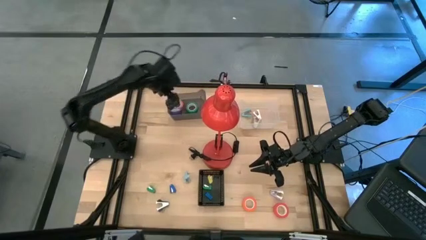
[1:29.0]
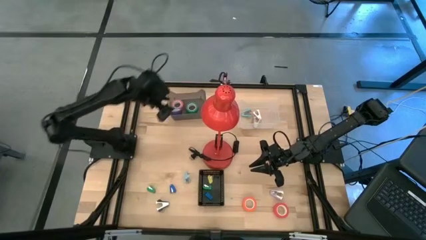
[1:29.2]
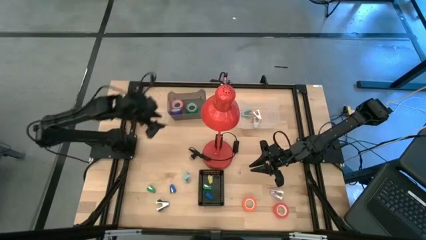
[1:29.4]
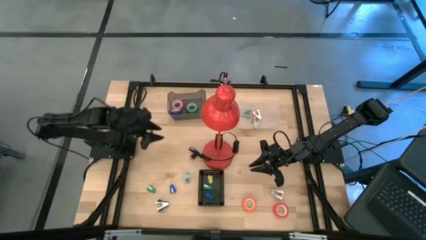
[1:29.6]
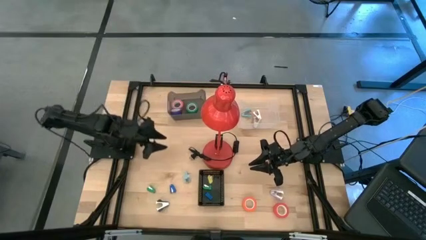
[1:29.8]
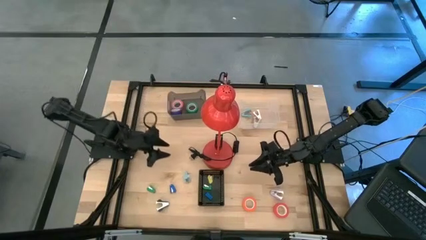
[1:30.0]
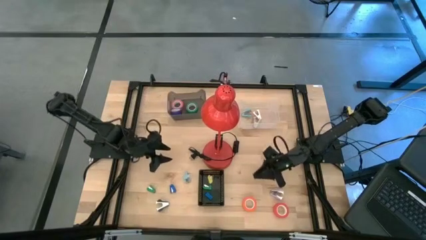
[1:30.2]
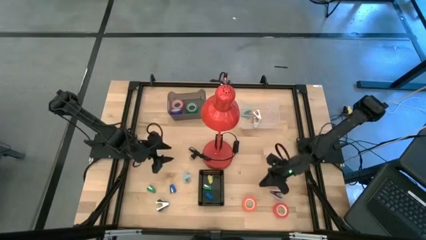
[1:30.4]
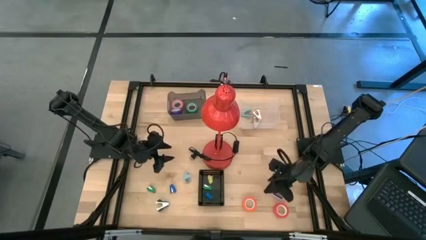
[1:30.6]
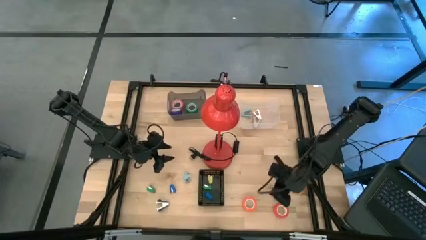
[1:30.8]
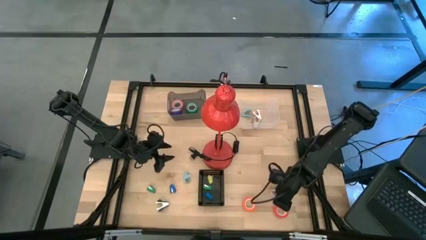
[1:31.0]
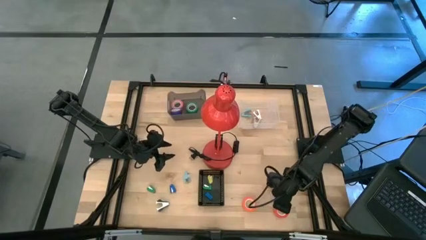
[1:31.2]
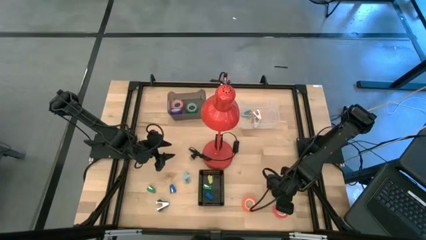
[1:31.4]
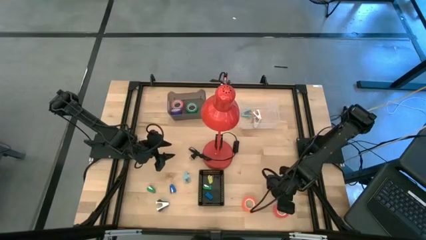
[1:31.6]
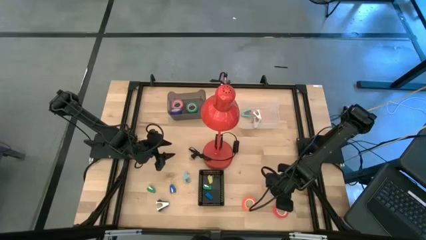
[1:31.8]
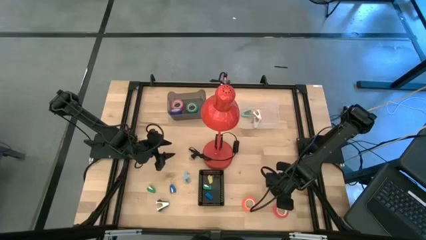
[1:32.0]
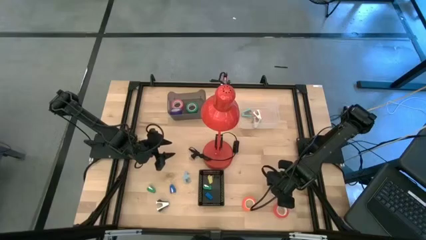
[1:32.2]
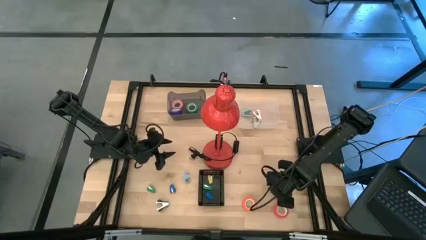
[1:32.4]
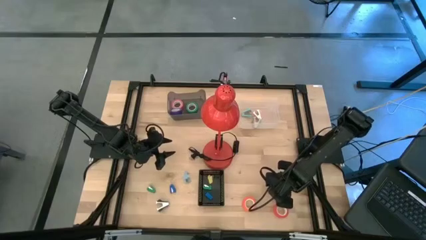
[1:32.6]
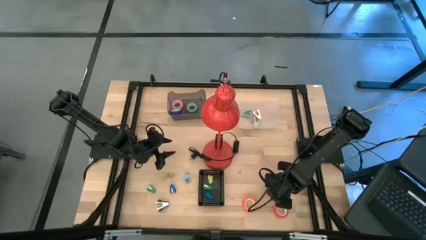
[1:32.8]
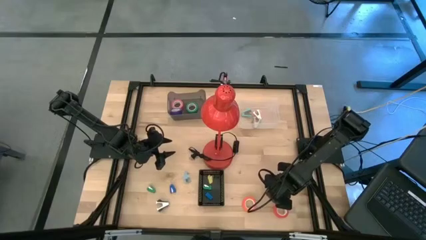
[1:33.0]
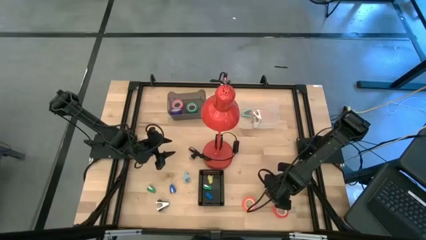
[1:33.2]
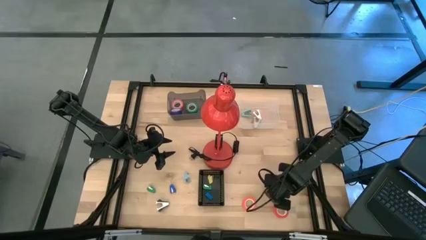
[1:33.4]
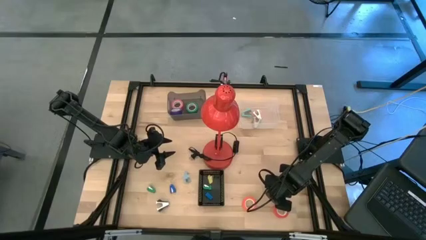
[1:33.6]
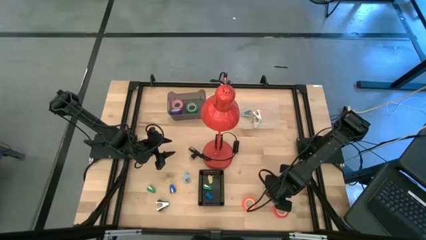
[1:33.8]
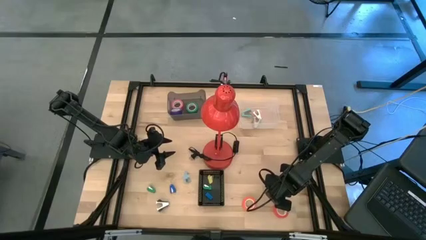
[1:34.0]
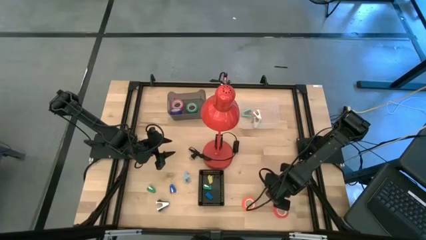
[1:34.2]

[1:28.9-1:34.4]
Task: Pick and place Stapler, Stapler remover, tape
Put the purple staple remover into the transparent bin

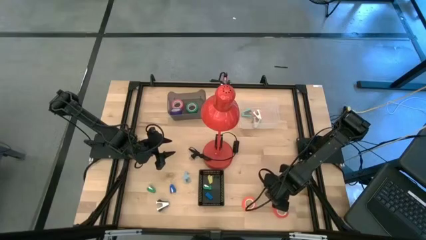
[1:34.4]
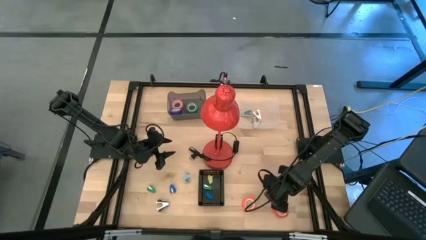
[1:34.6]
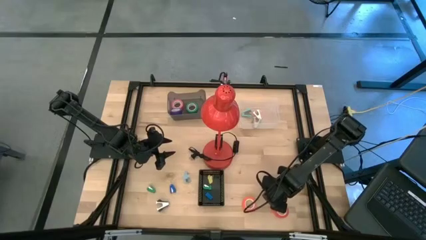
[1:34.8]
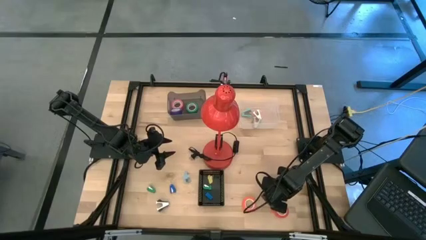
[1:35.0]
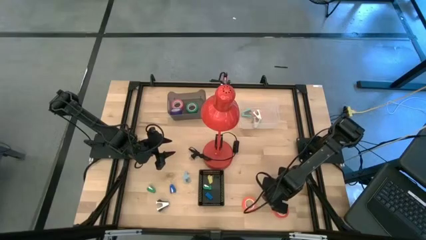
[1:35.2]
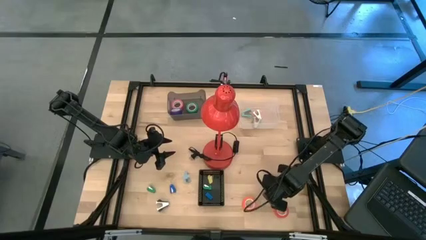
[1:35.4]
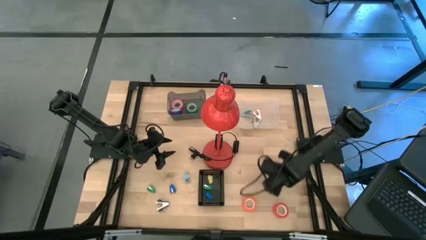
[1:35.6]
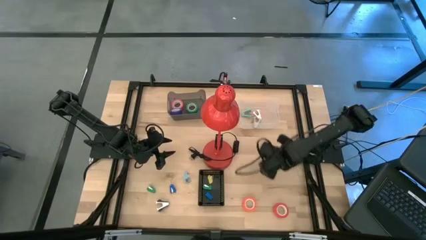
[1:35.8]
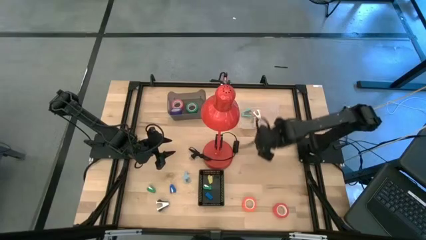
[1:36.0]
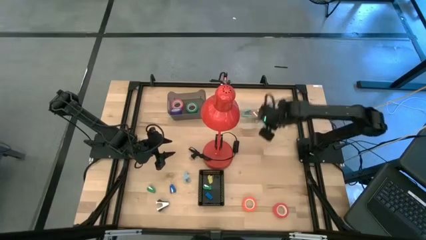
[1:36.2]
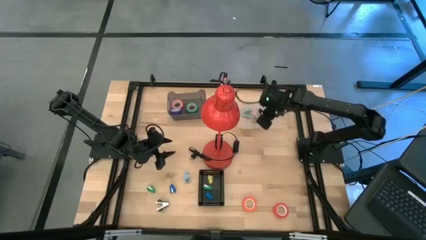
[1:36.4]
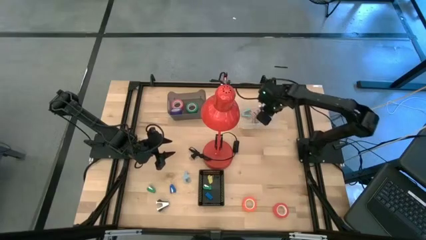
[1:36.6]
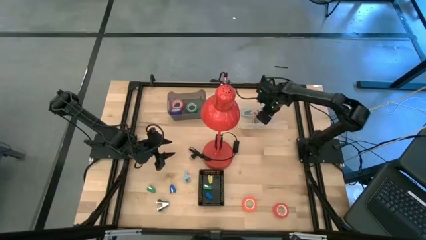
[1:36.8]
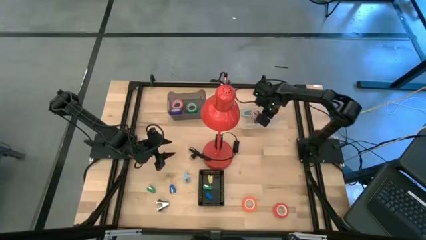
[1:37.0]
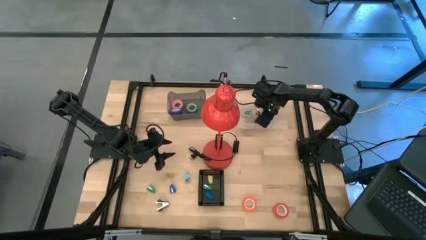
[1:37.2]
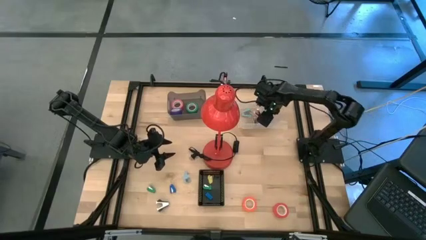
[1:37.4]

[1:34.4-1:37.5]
Put the purple staple remover into the transparent bin

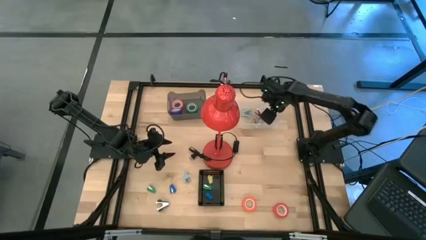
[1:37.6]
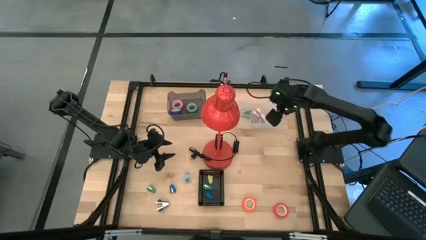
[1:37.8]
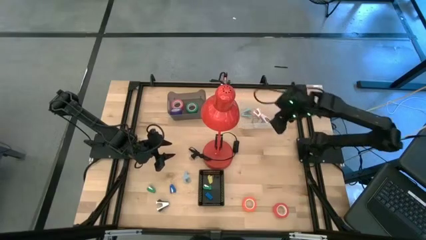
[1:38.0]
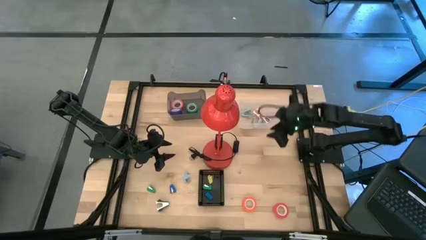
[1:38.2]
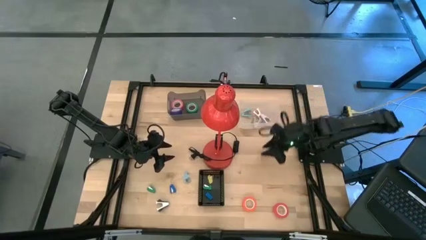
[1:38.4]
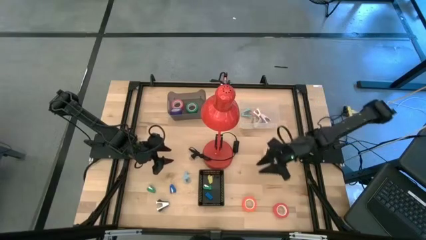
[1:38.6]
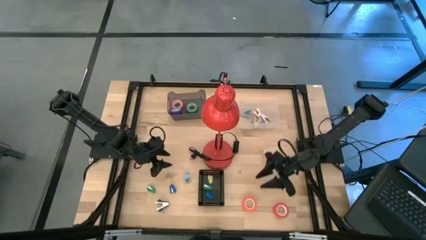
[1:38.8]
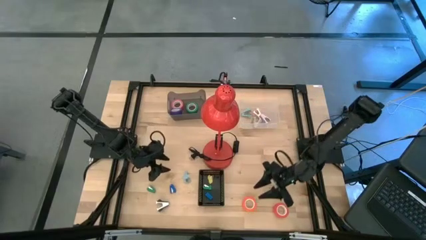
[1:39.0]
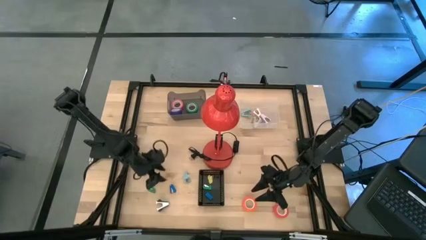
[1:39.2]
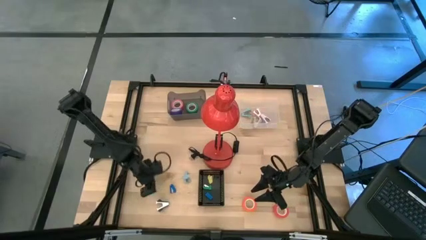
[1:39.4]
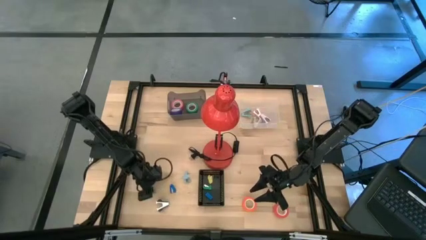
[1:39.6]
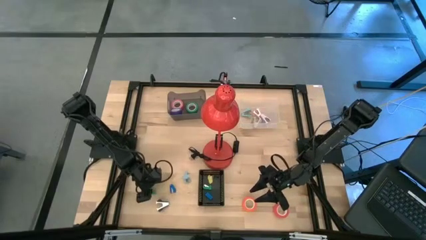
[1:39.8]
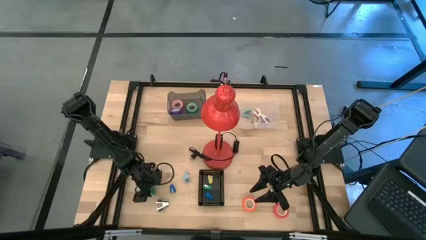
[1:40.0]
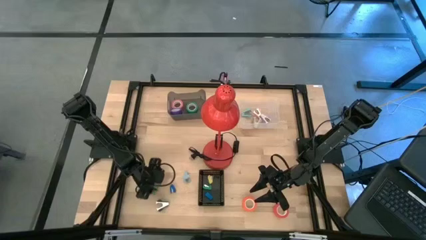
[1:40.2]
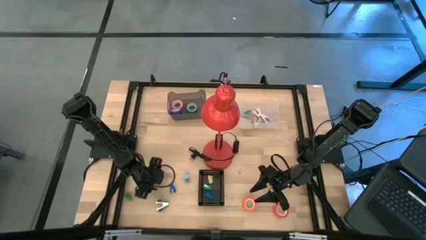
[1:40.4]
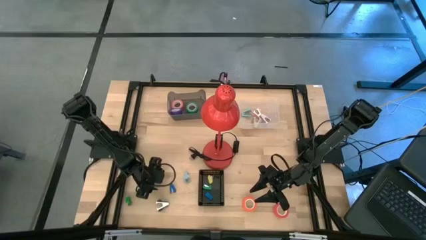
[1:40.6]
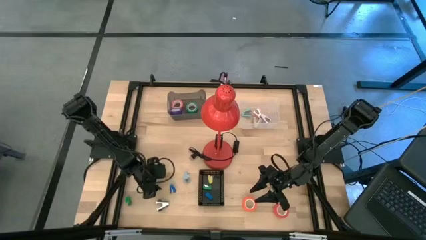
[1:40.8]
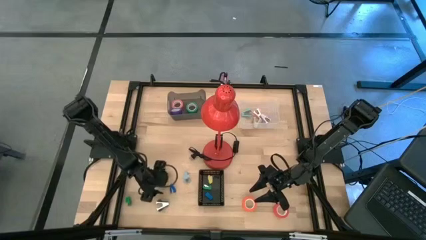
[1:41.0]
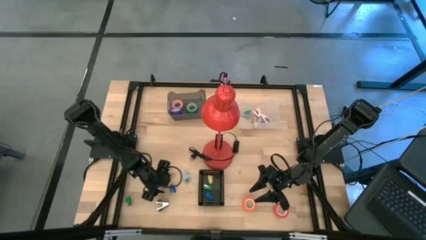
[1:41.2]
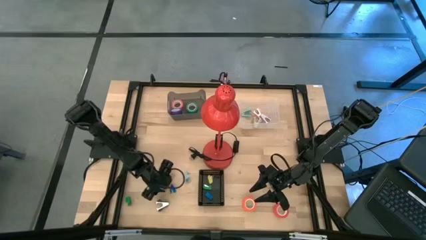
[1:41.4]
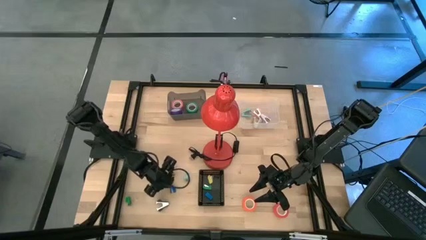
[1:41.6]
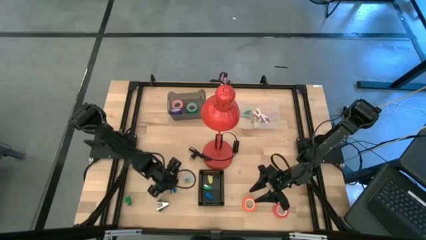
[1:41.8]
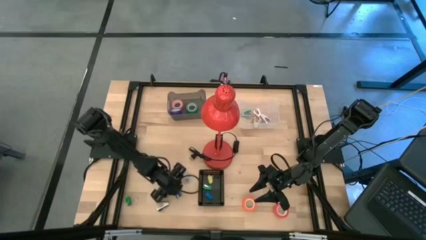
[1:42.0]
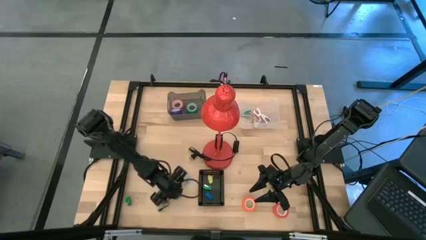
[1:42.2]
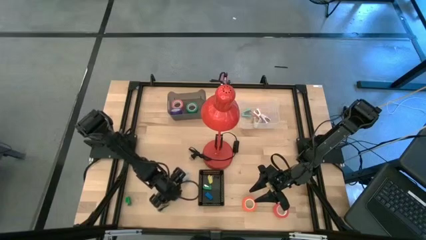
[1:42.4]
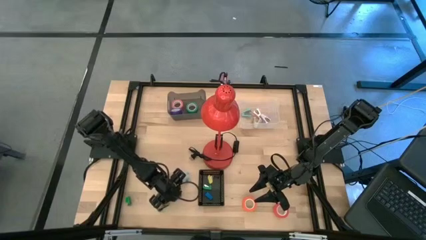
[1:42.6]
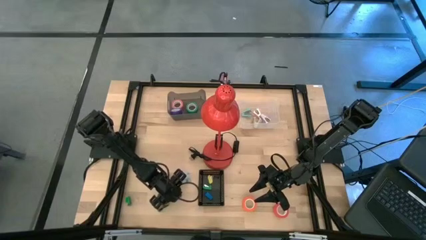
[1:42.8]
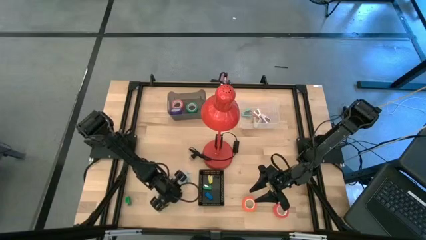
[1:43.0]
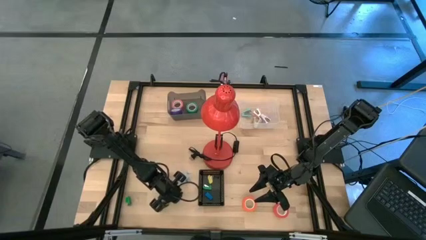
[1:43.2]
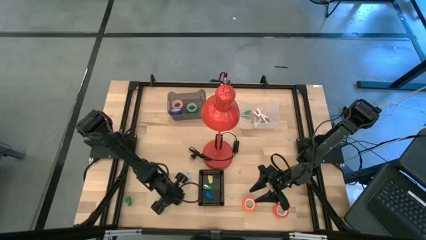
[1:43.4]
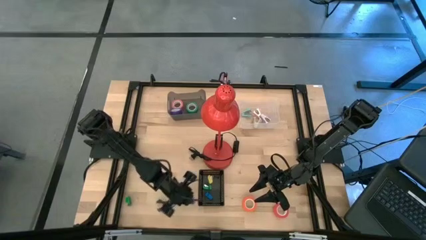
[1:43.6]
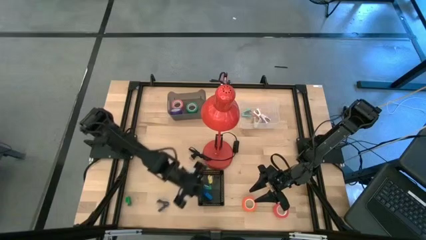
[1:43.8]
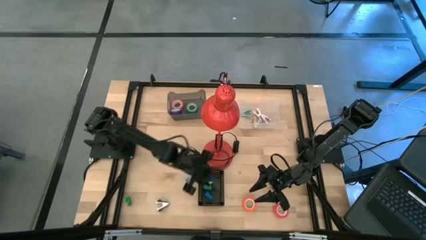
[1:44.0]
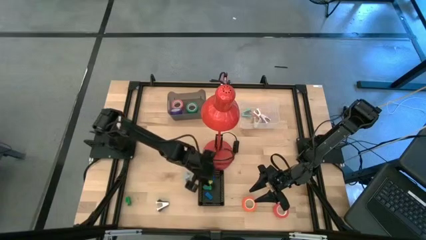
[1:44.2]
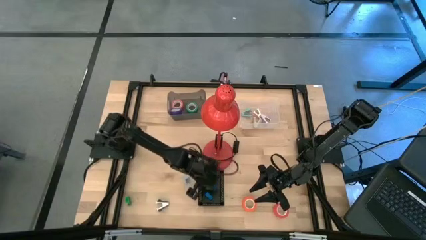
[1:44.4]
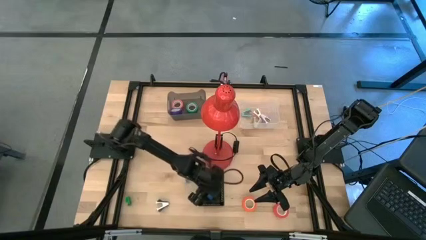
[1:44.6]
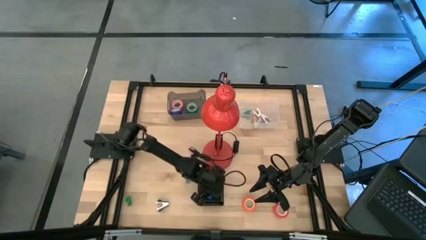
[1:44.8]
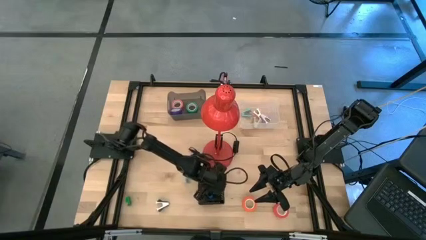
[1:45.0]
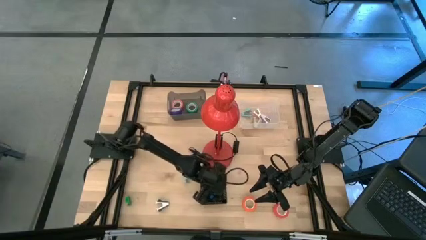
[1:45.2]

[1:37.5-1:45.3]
Put the blue stapler into the black bin
